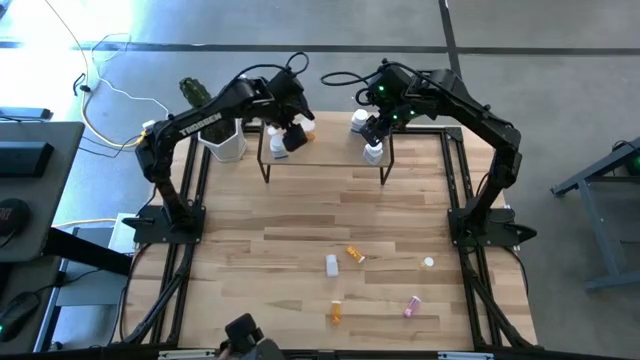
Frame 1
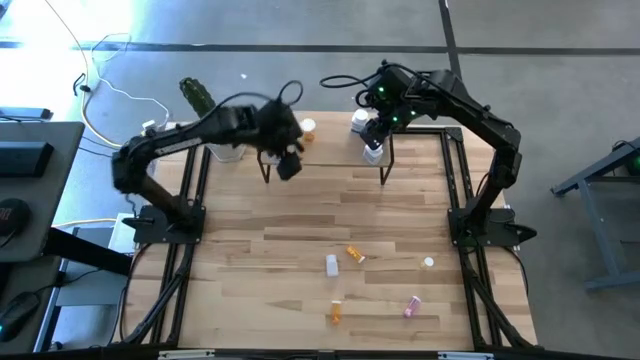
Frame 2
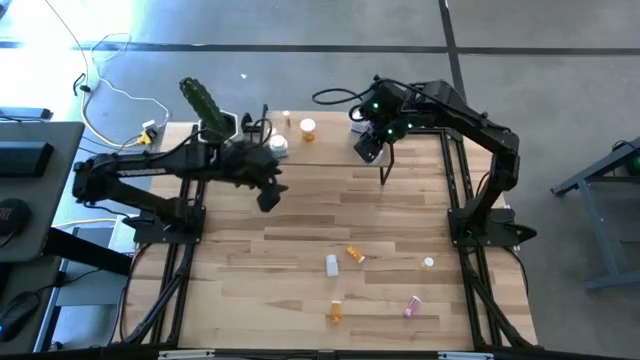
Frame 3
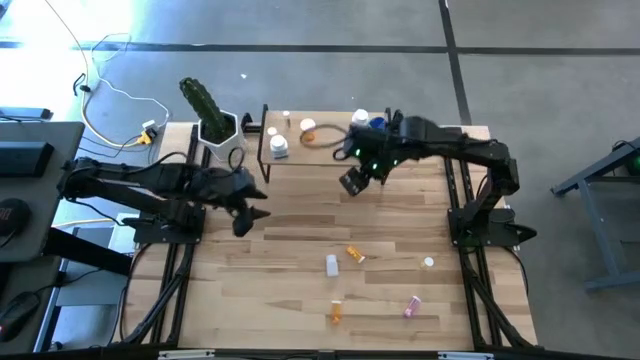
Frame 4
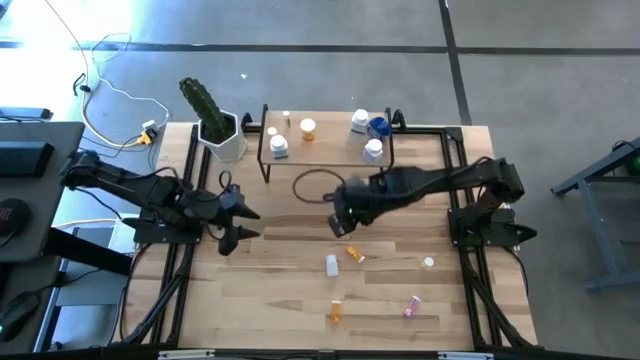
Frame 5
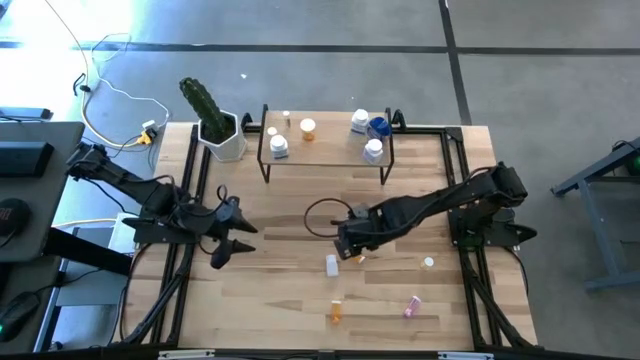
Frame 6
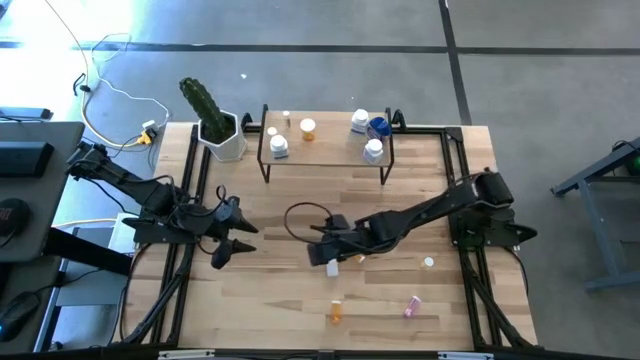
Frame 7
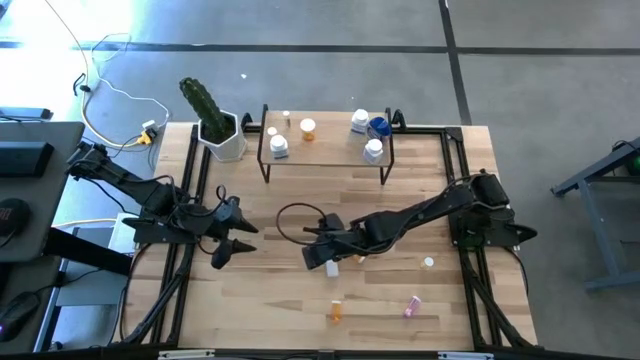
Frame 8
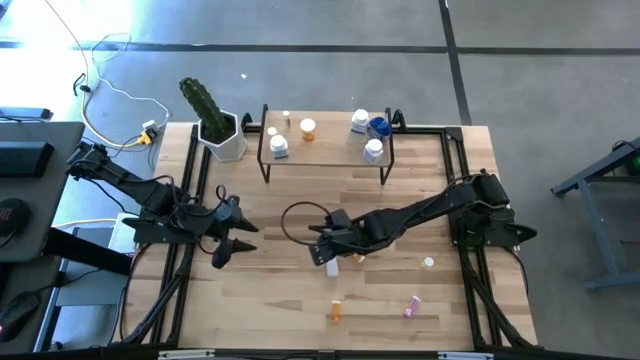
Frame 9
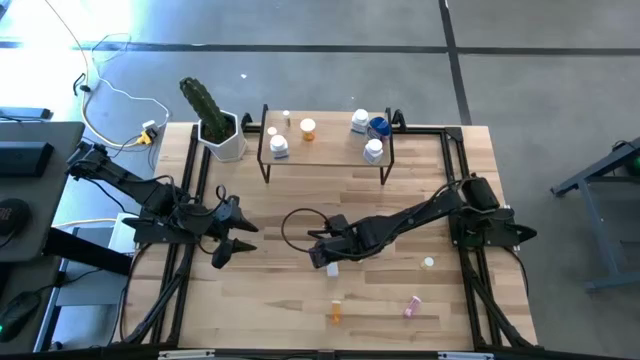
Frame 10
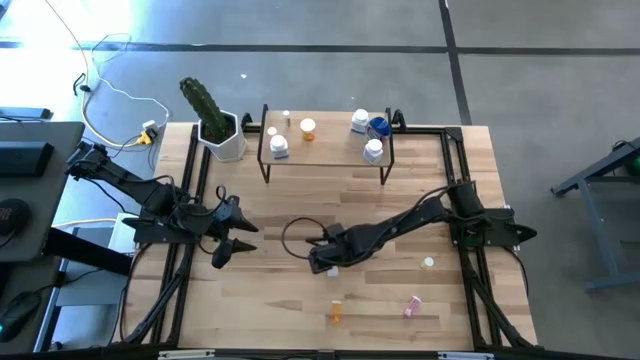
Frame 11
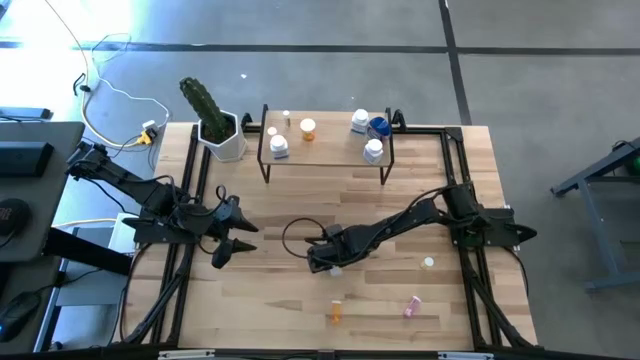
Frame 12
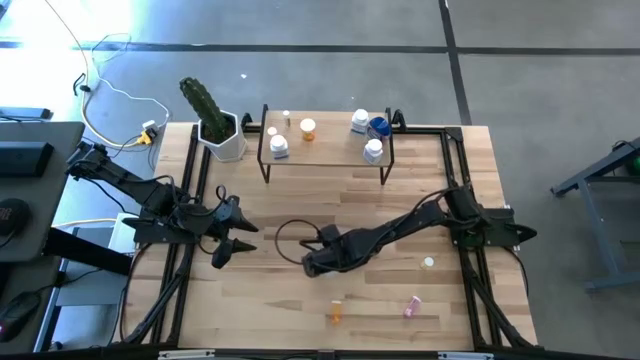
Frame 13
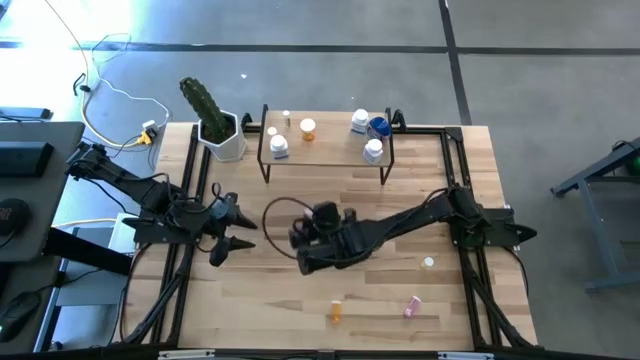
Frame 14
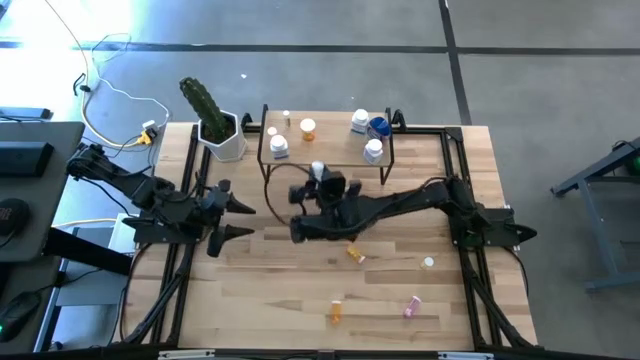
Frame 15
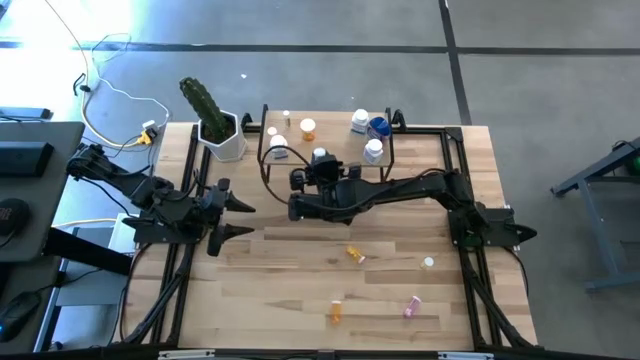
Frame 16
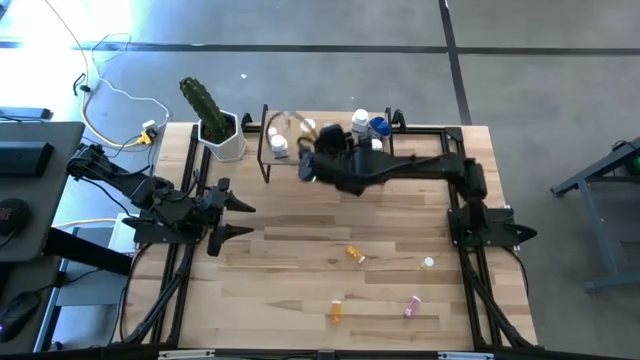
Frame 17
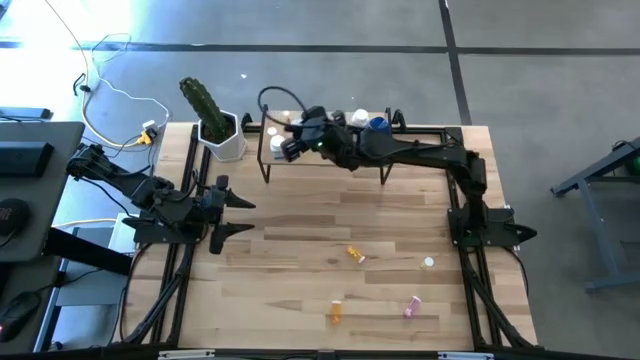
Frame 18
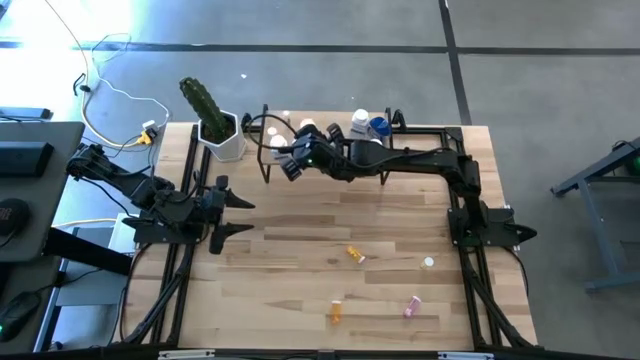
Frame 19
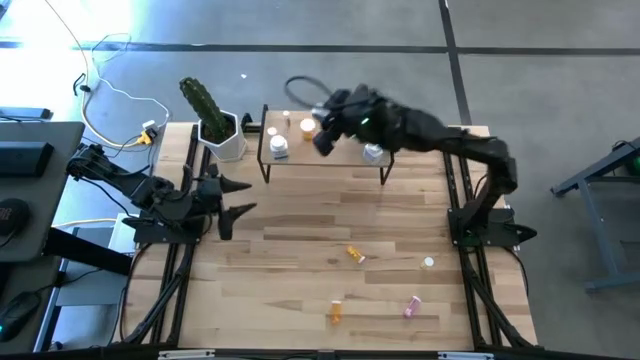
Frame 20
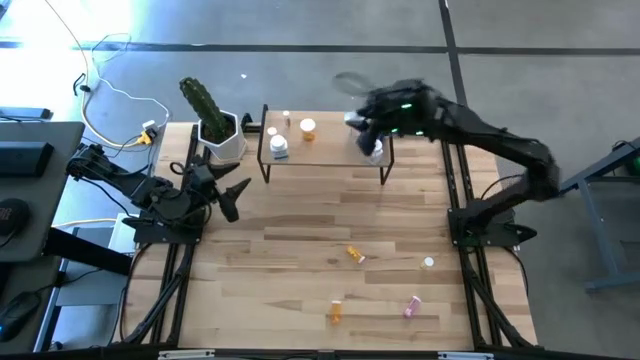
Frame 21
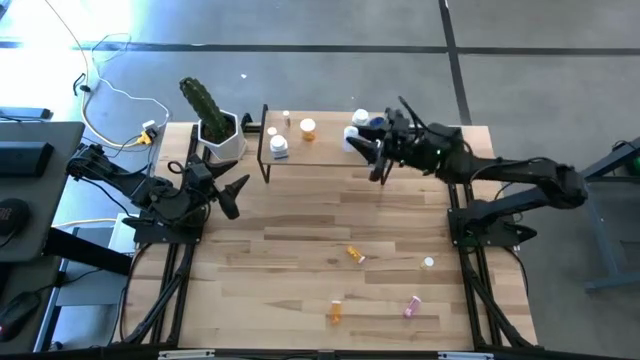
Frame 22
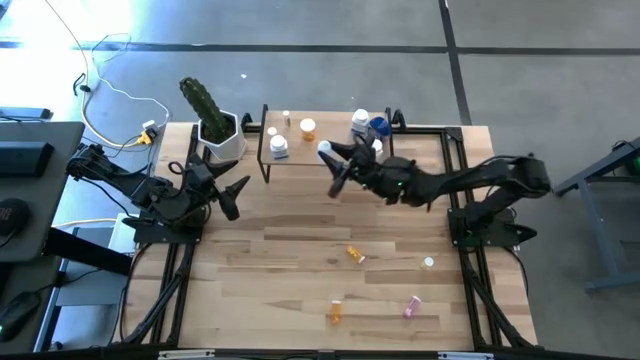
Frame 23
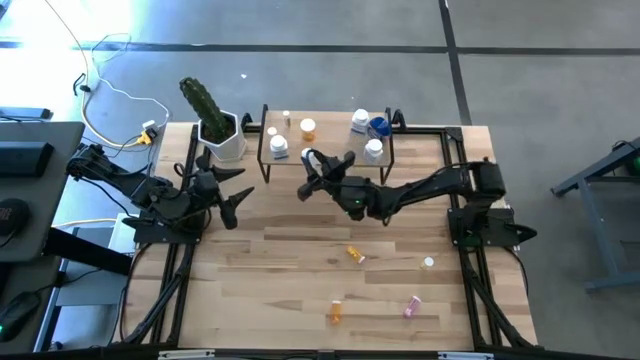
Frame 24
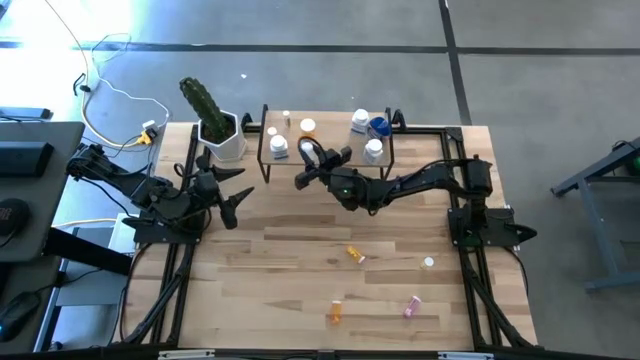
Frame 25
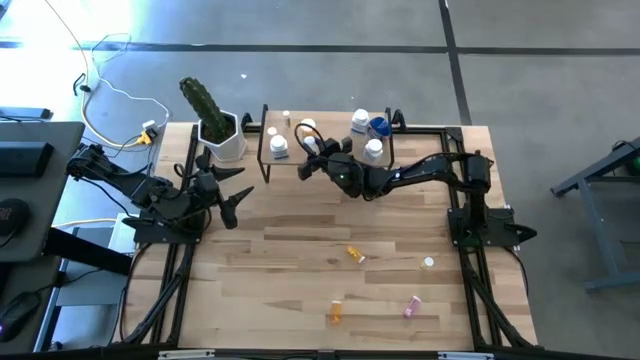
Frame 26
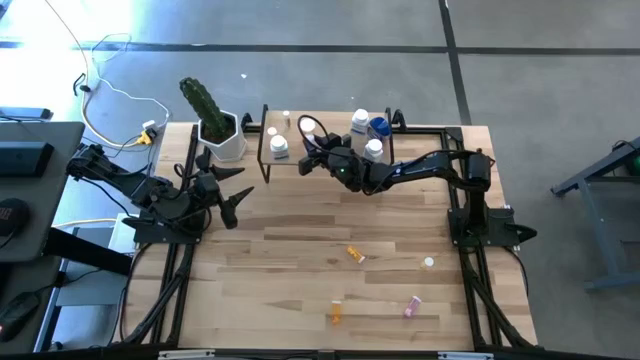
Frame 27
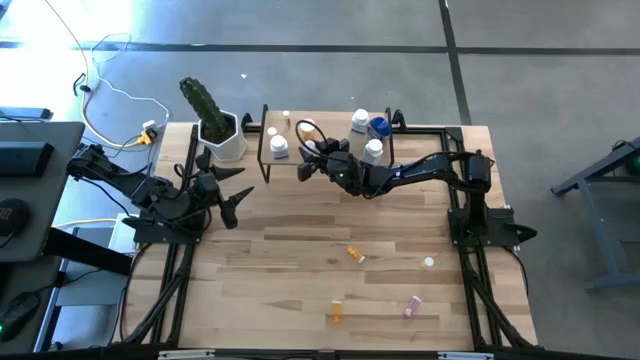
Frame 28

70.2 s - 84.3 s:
Task: Pick and place medicine bottles onto shelf by color
Put the white pill bottle on the shelf

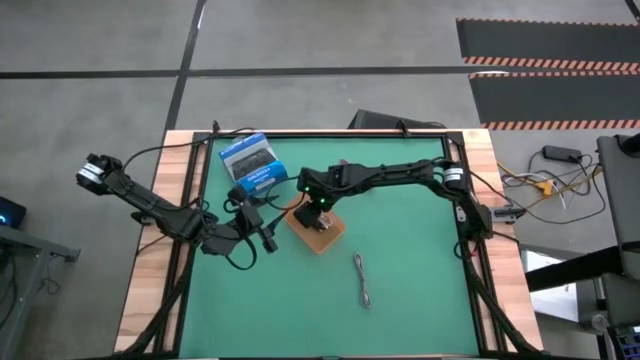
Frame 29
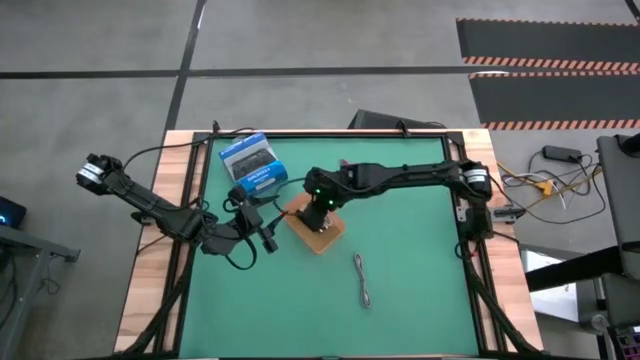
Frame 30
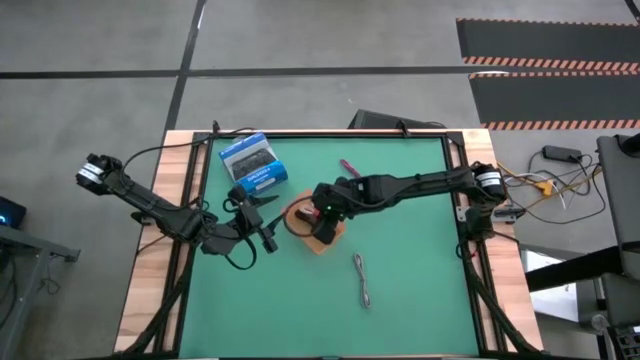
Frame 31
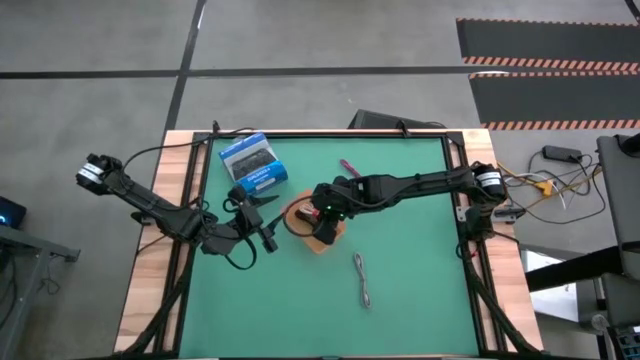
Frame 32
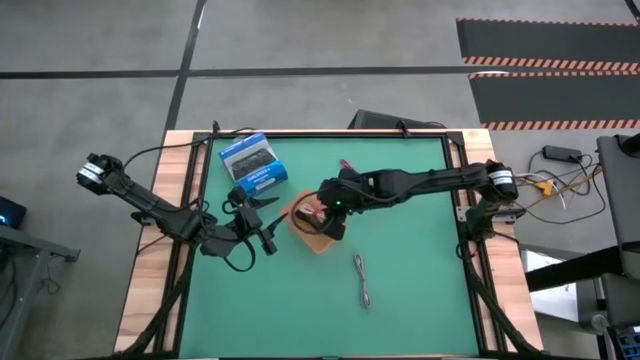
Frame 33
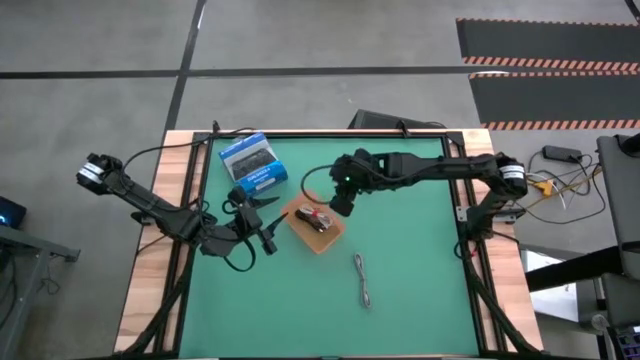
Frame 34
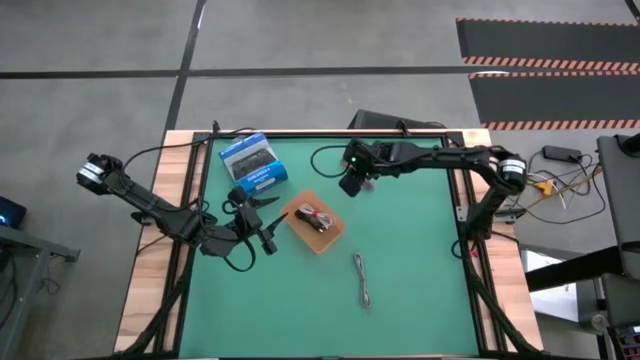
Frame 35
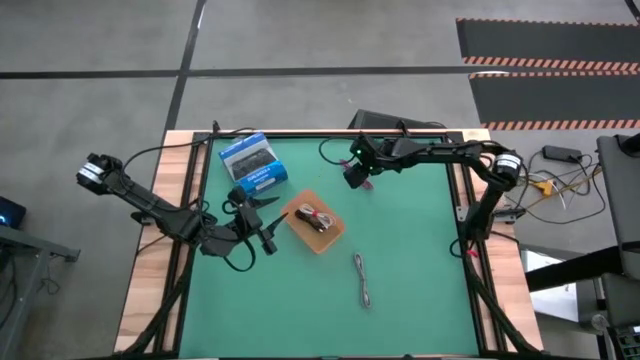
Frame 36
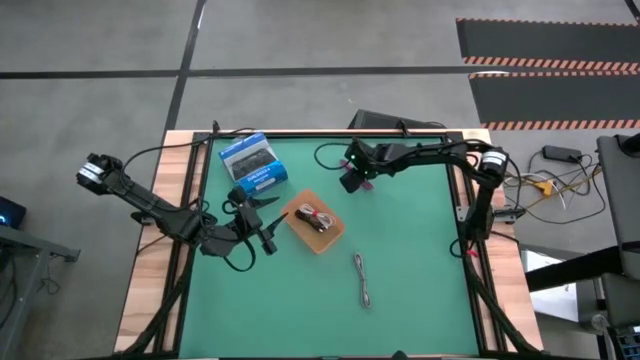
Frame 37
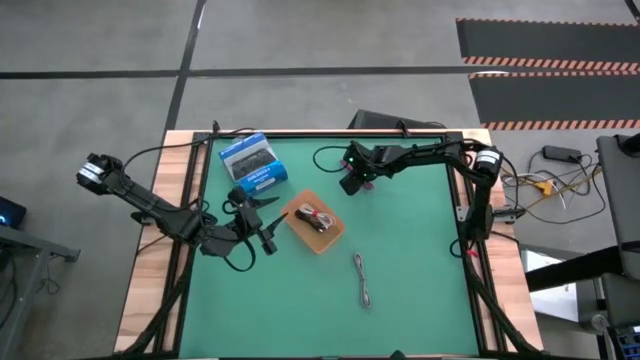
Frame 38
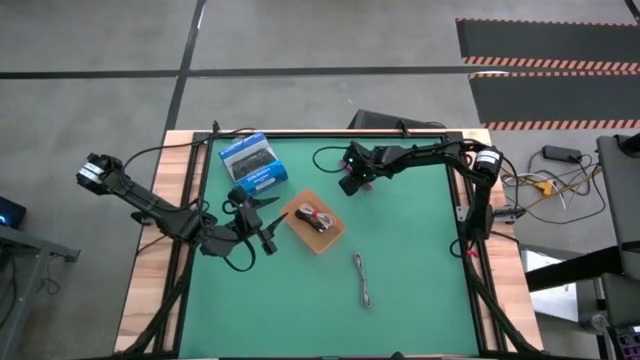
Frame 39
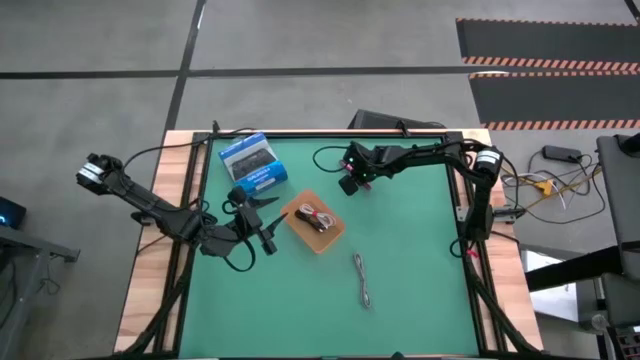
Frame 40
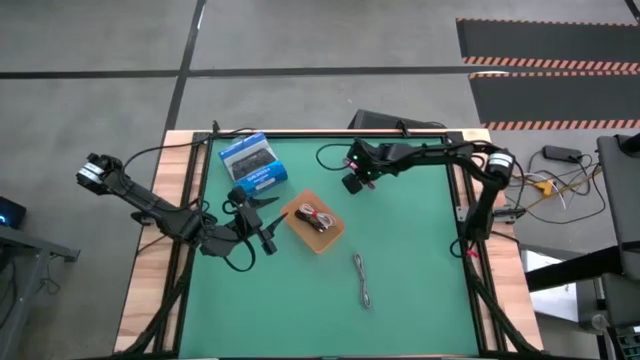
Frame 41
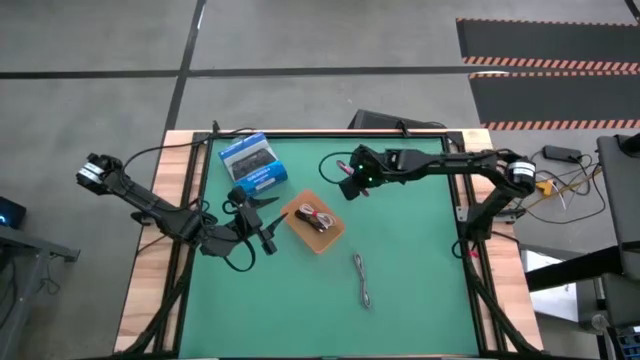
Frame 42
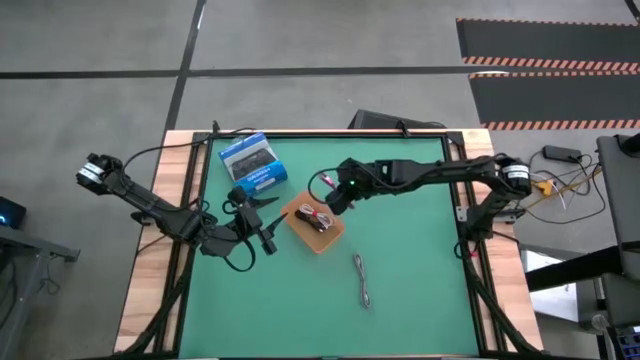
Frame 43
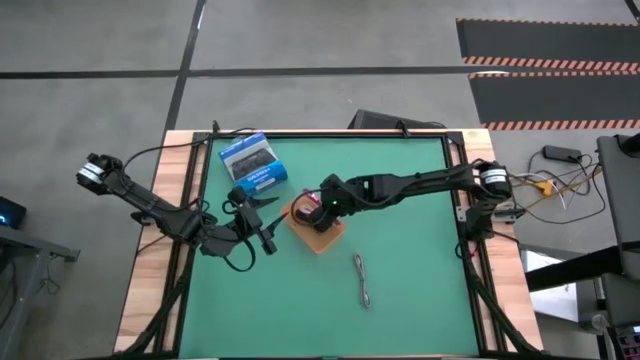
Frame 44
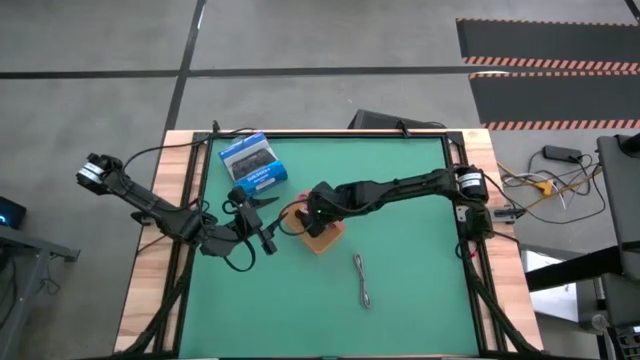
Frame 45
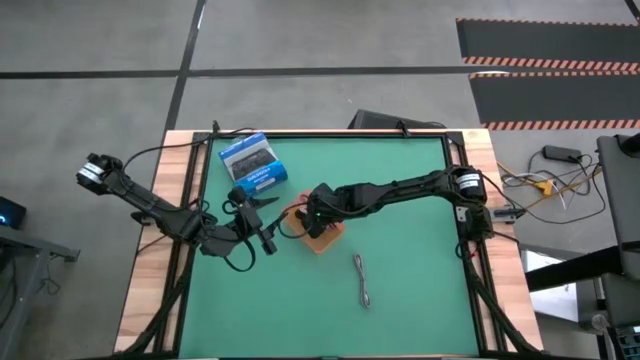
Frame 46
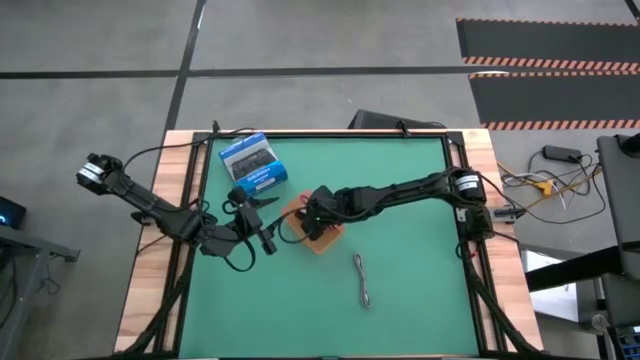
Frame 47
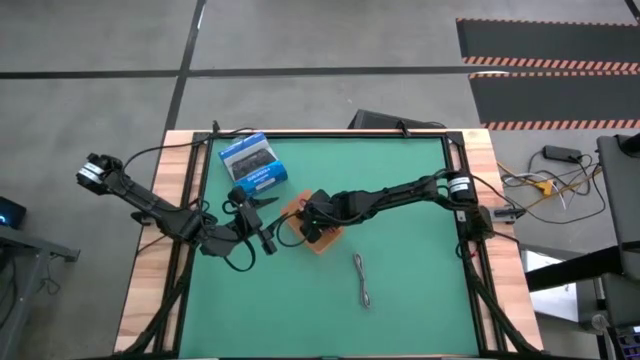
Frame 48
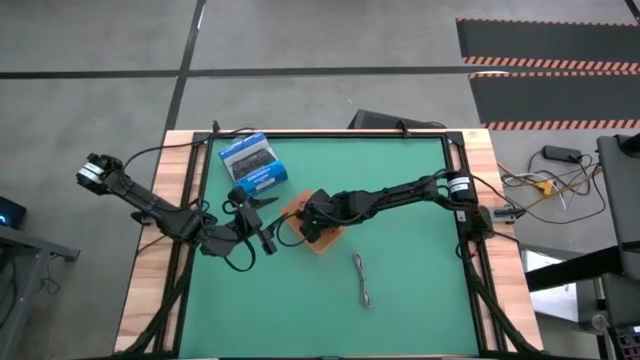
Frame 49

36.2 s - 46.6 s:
Task: Pick and place USB-C Cables
Put the red charger cable into the orange bin
